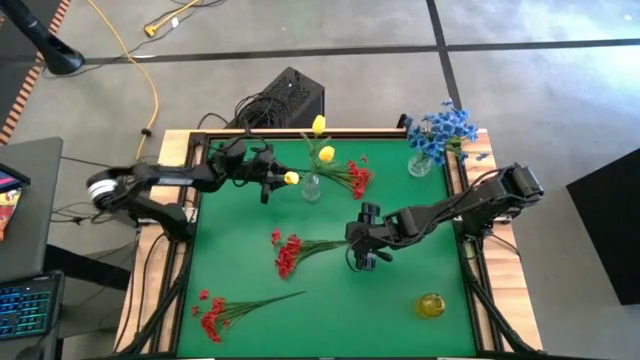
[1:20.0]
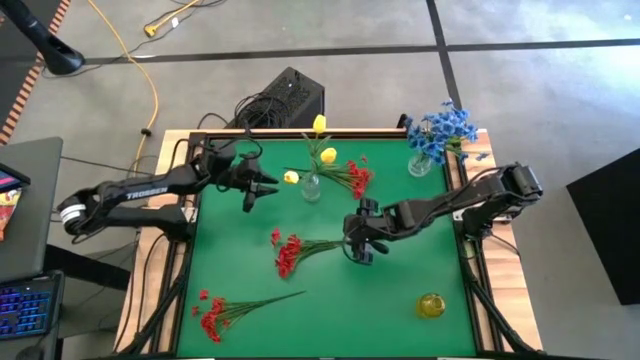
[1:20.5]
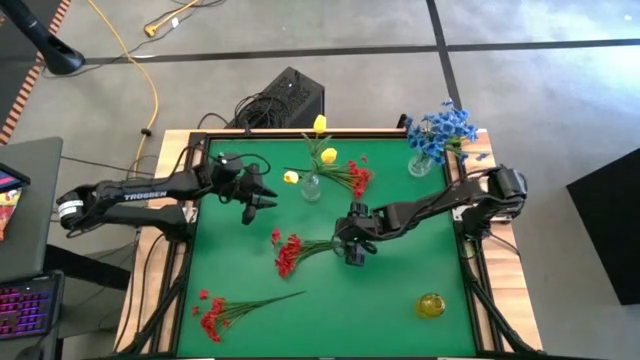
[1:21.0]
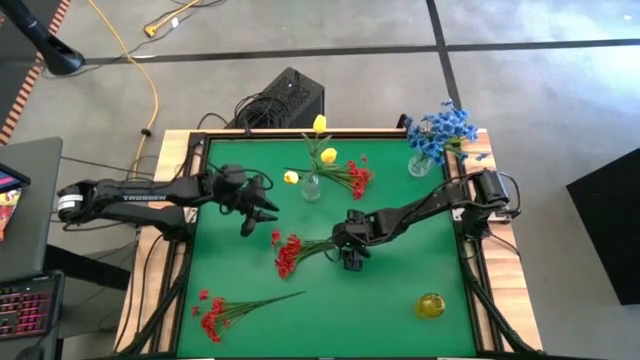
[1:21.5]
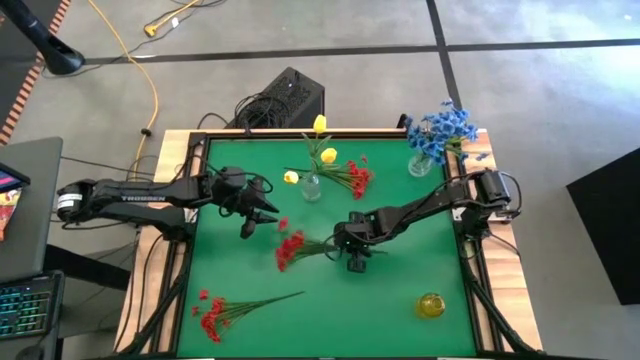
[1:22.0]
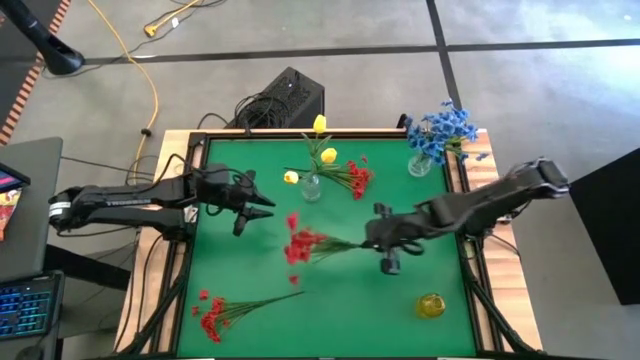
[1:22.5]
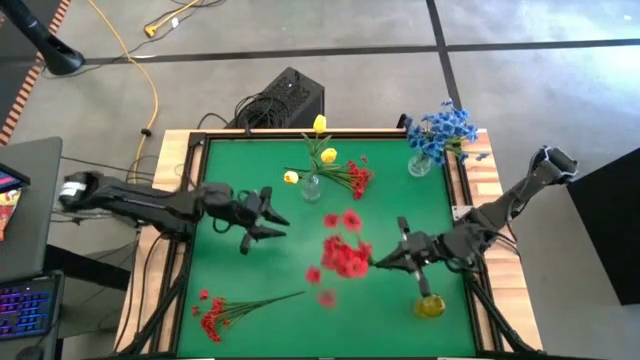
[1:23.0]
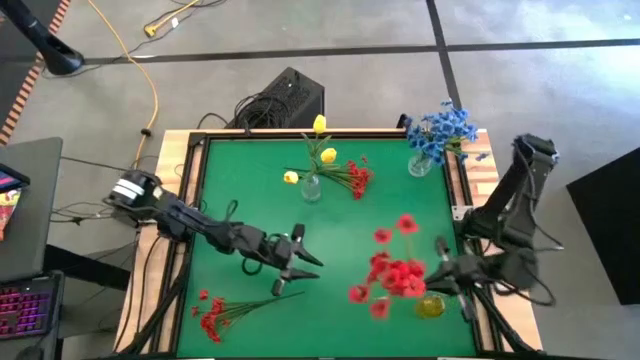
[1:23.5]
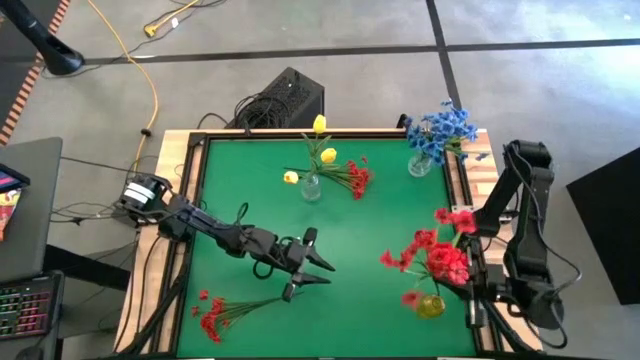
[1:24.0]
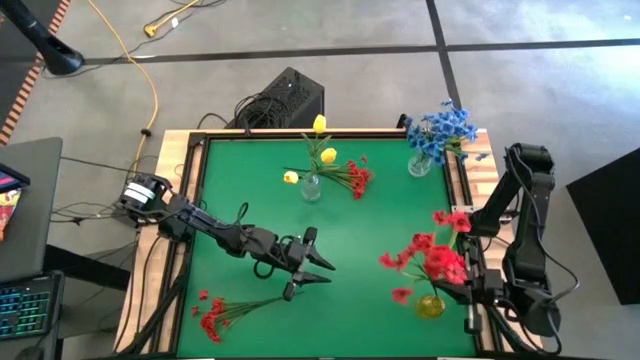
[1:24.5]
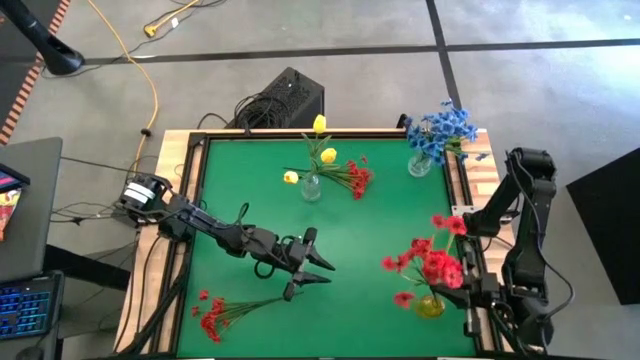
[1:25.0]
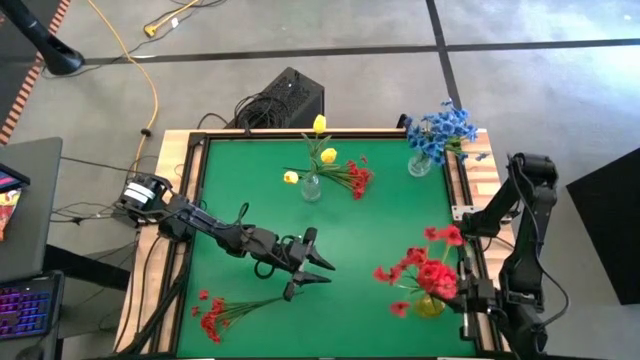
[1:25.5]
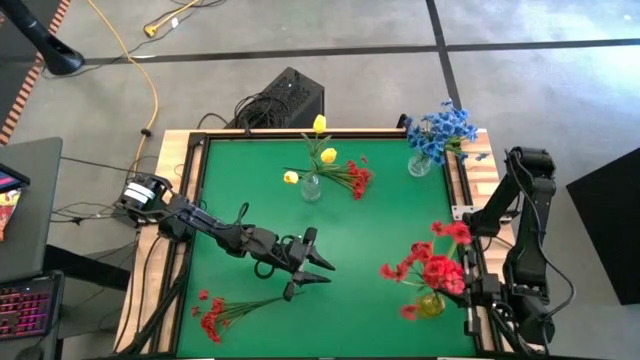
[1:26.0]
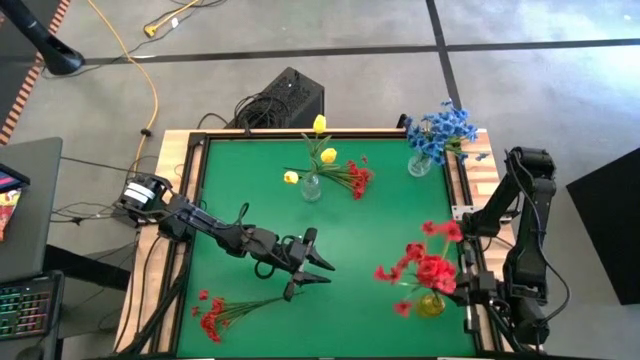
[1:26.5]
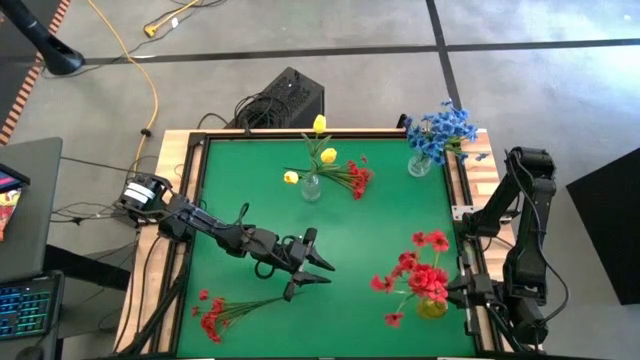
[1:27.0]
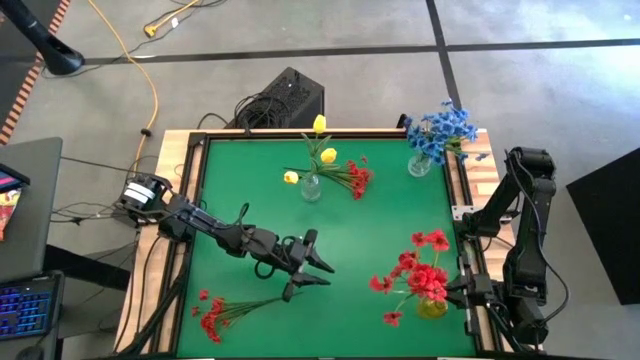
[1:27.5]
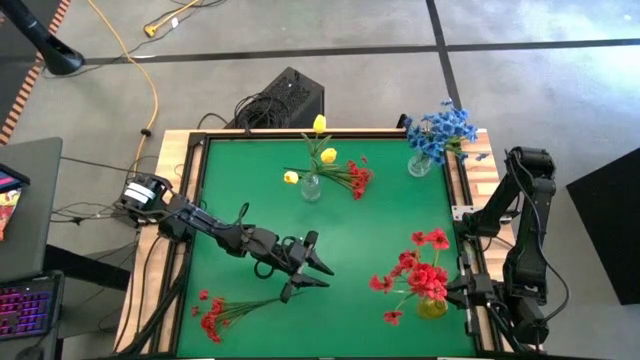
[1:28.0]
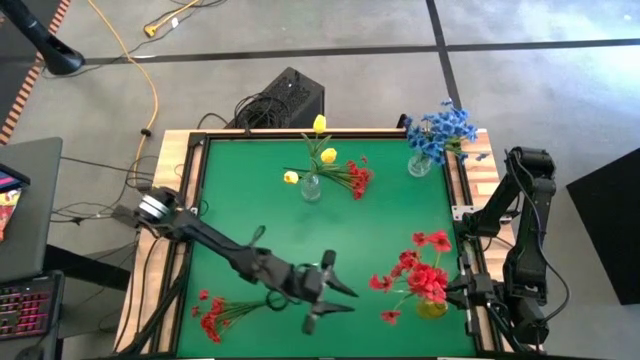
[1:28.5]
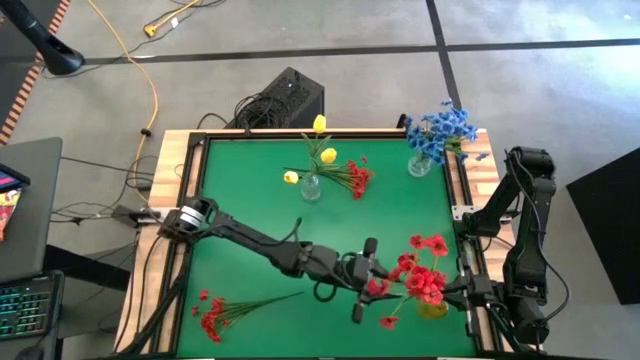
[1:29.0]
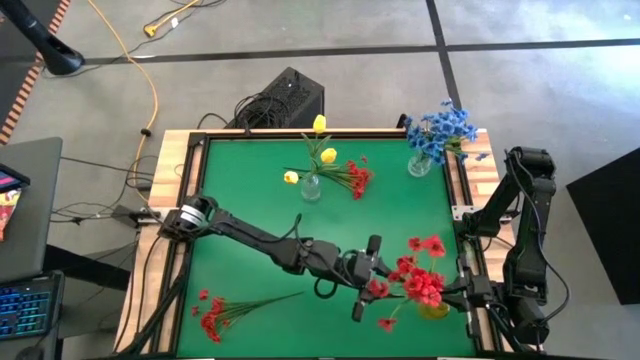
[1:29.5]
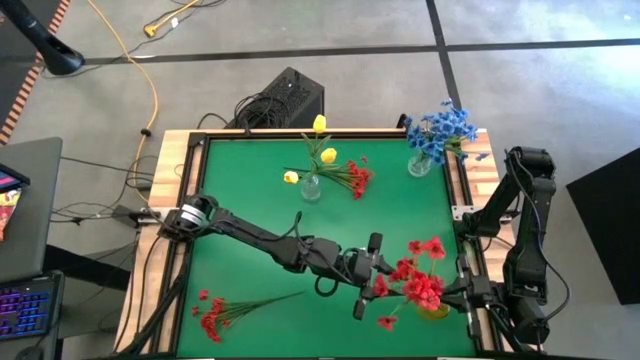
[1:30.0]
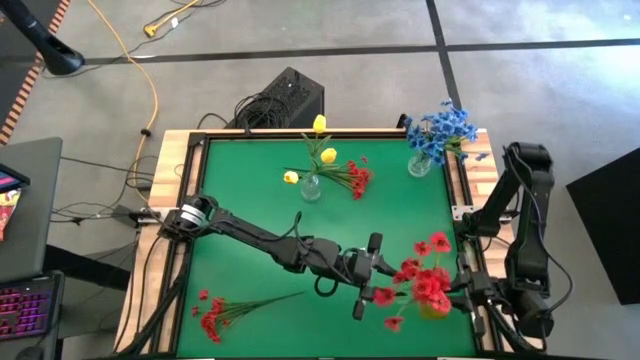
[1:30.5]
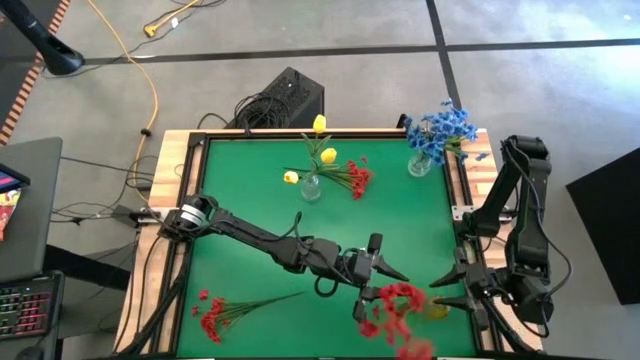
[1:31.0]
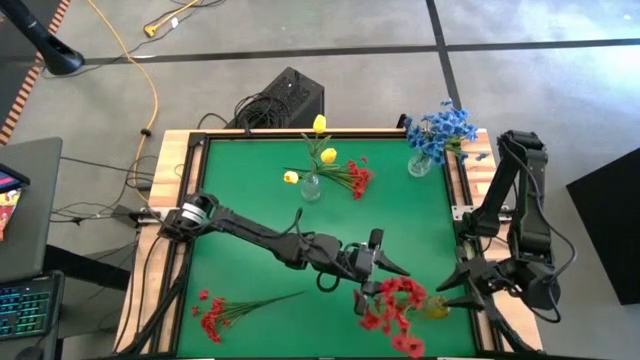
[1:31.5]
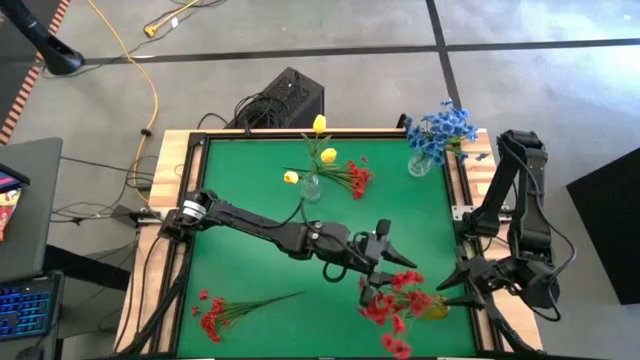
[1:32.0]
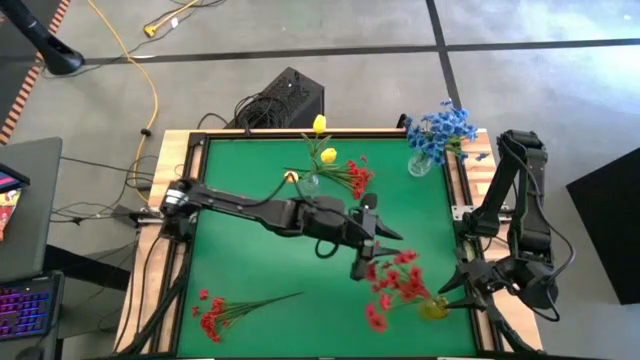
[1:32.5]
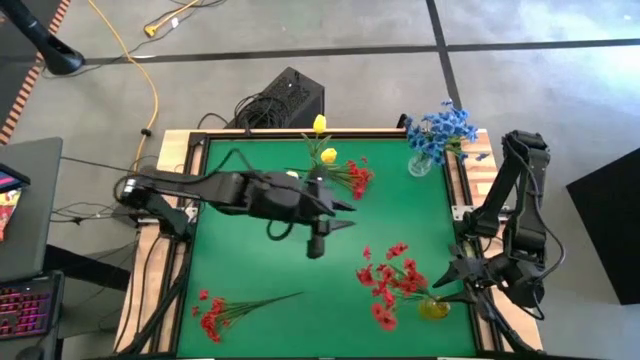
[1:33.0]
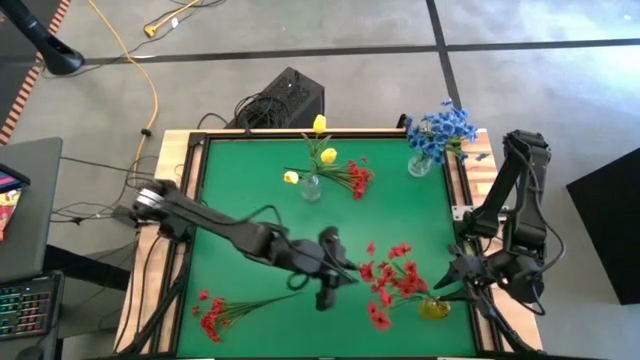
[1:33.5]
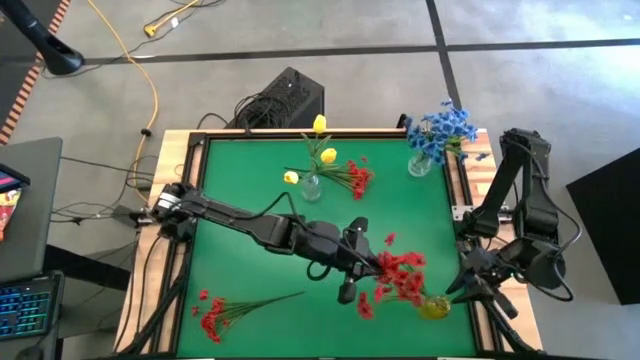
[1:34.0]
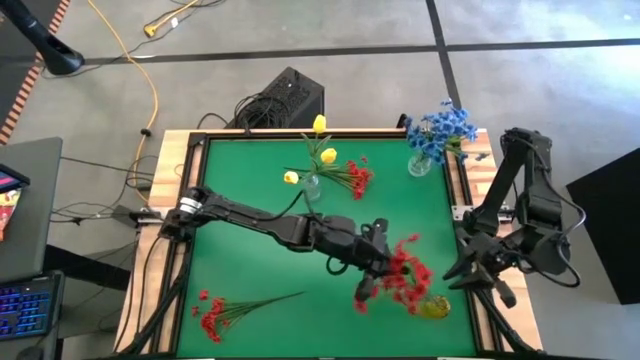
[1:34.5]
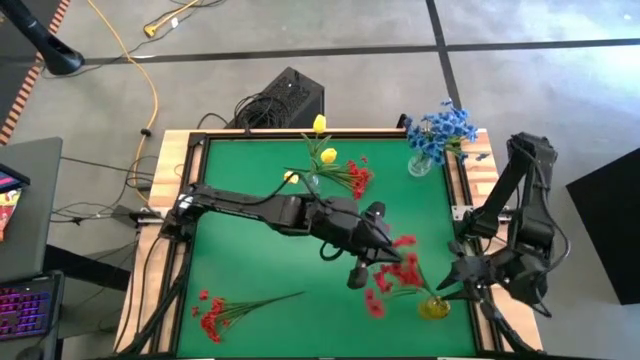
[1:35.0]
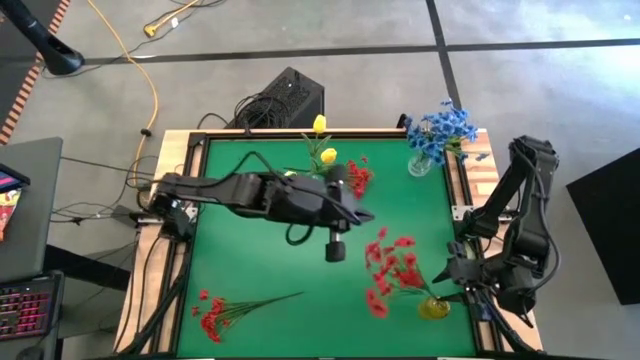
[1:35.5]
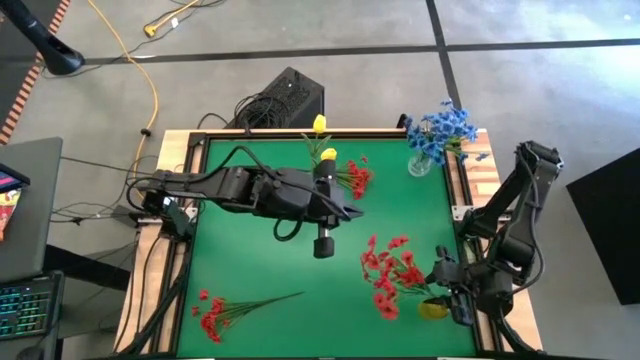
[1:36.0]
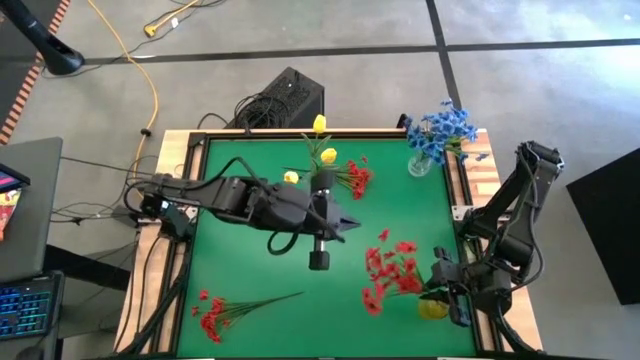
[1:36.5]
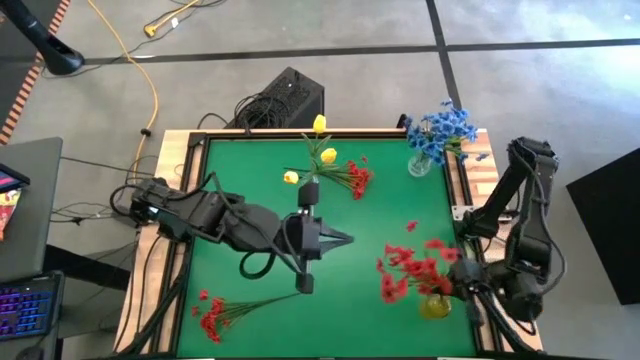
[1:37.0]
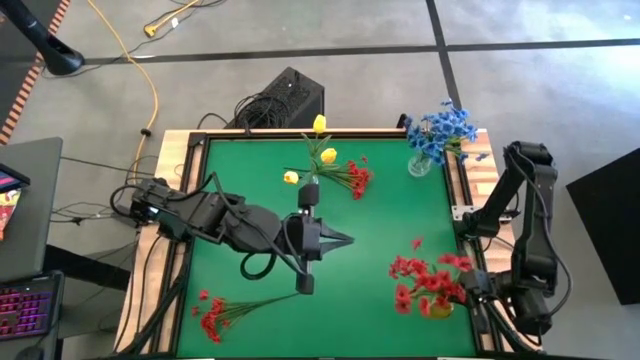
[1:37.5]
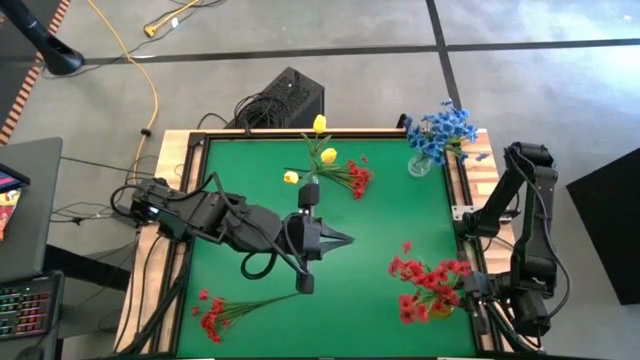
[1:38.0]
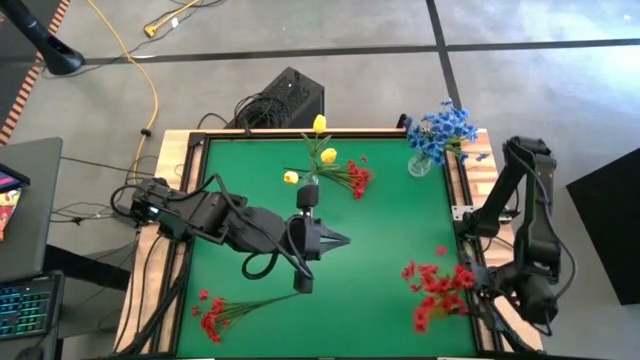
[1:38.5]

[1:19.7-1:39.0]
Task: Sort flowers into vase by color
Put the center red flowers into the yellow vase

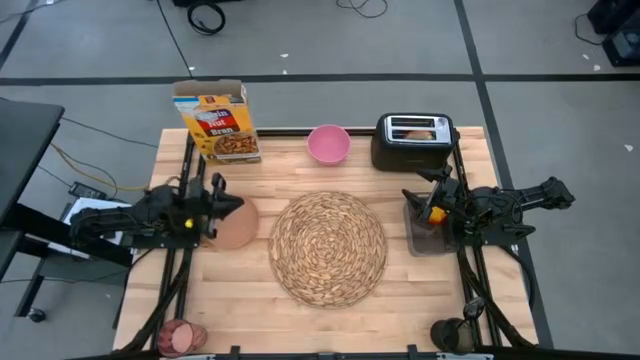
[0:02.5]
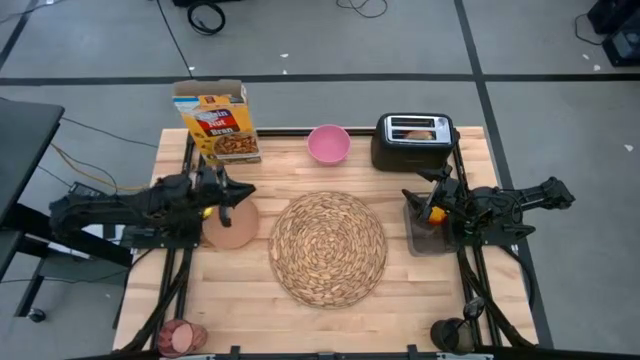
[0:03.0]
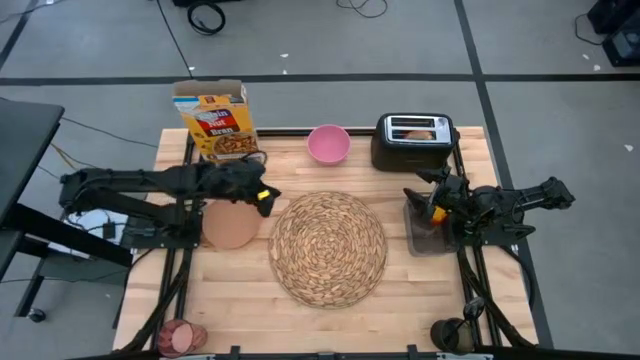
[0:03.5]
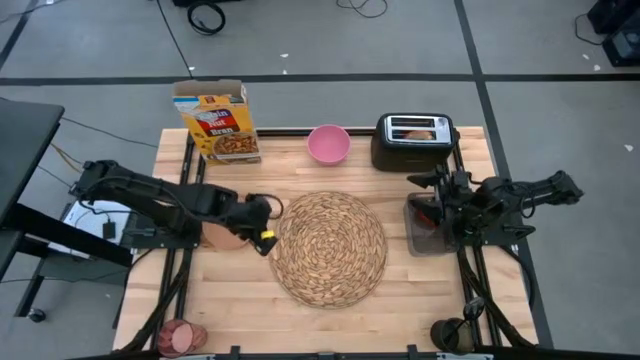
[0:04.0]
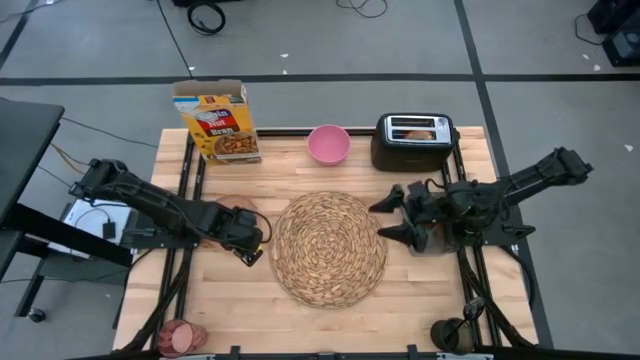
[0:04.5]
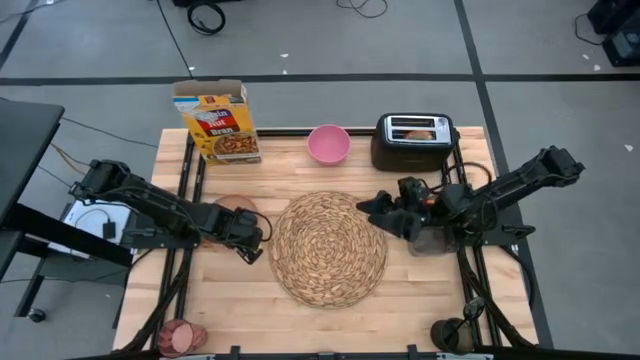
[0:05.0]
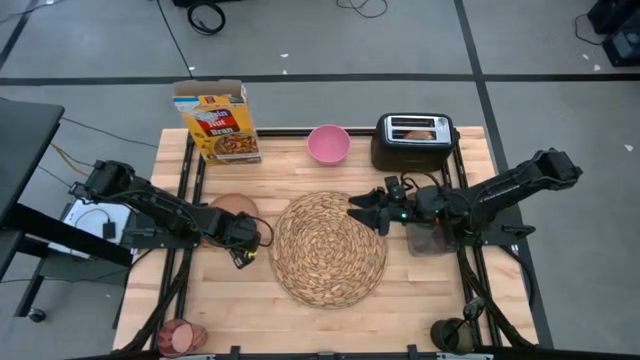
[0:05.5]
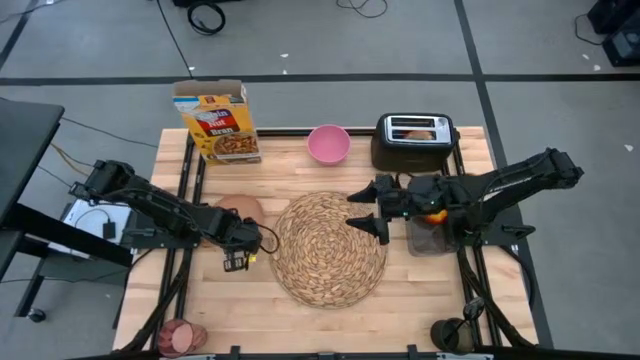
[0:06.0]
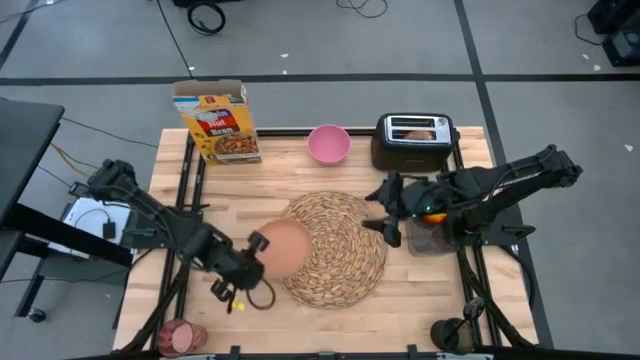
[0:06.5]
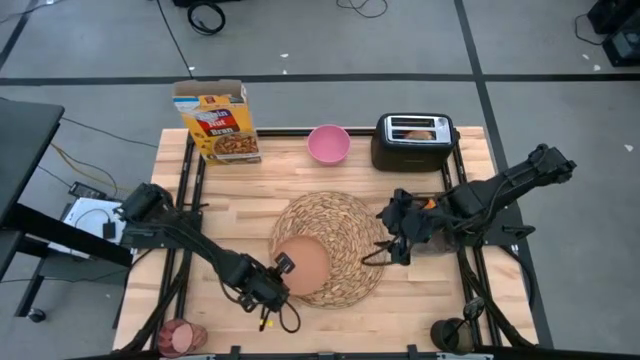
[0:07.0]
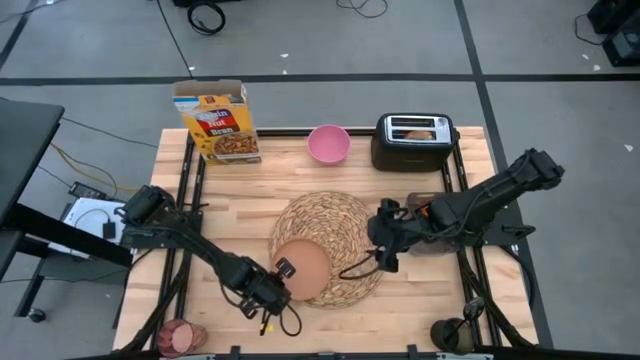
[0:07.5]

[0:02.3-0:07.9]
Task: Arrange a breakfast setting
Put the light orange plate on the brown placemat
